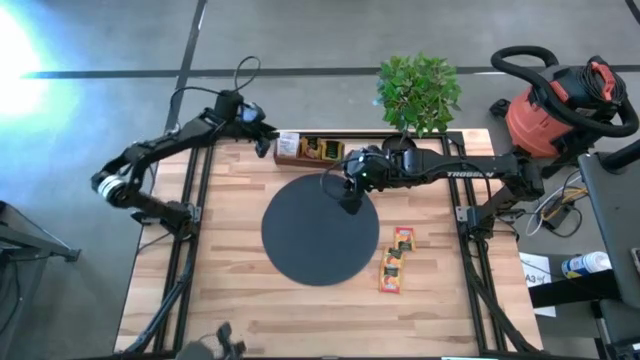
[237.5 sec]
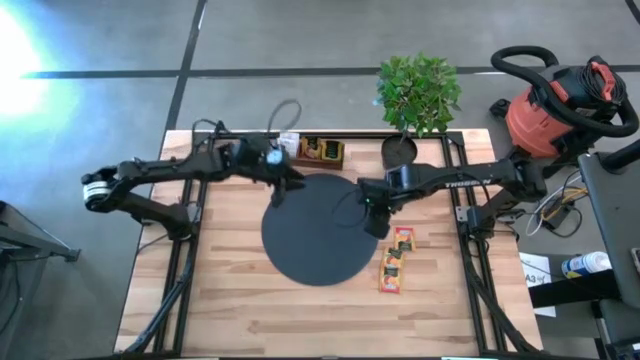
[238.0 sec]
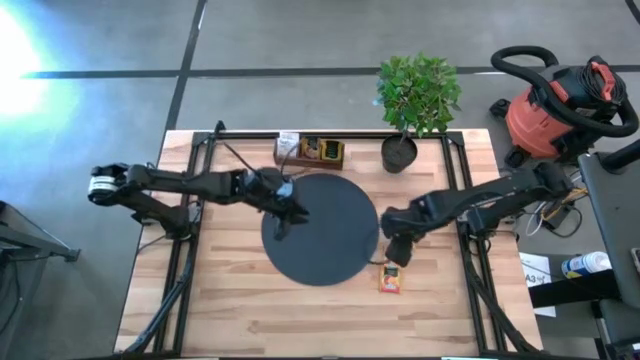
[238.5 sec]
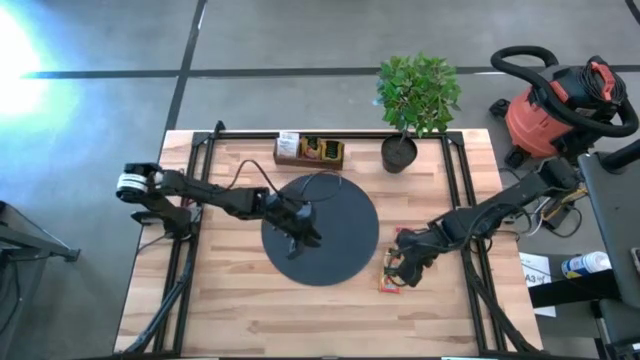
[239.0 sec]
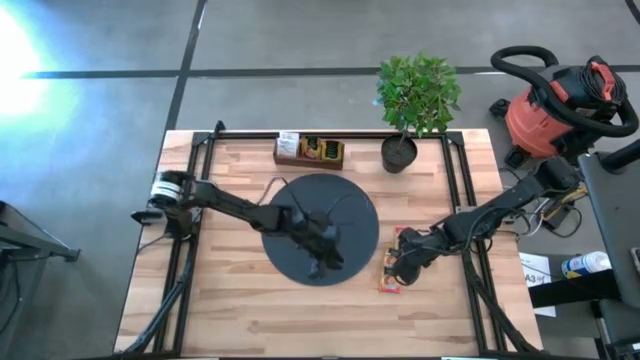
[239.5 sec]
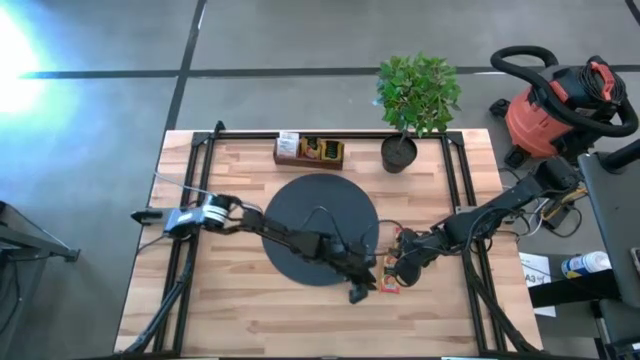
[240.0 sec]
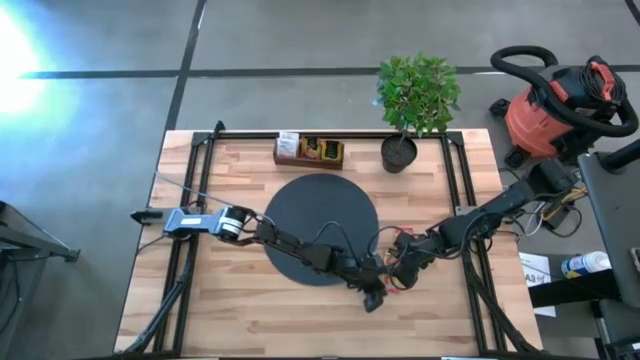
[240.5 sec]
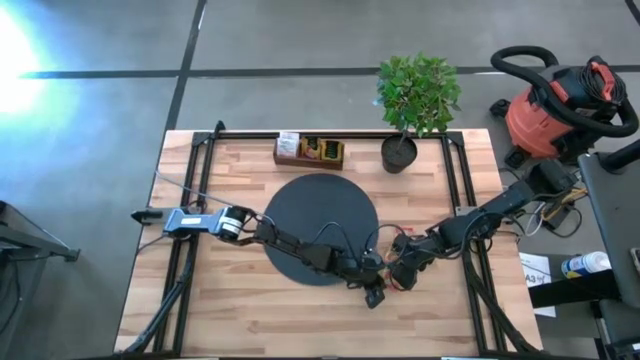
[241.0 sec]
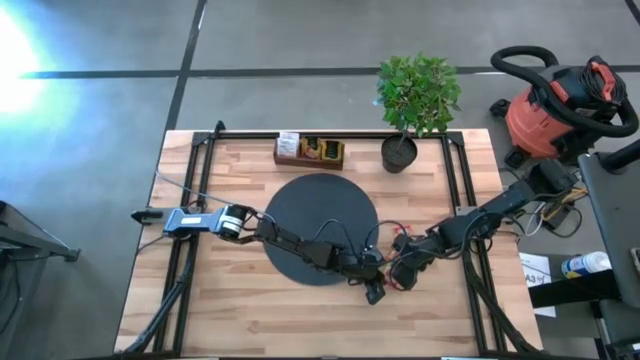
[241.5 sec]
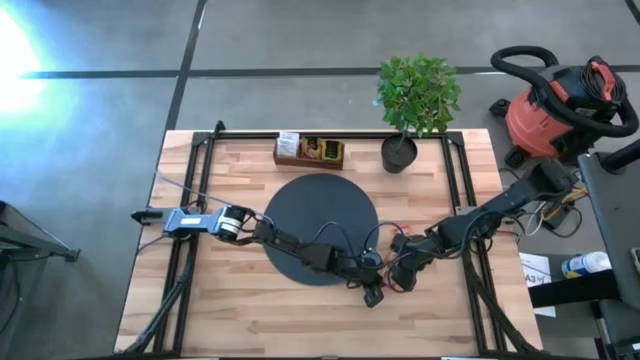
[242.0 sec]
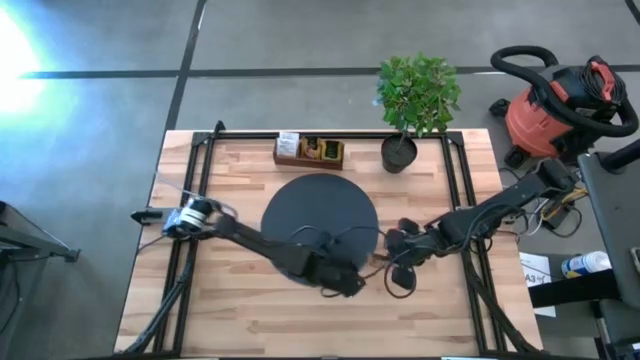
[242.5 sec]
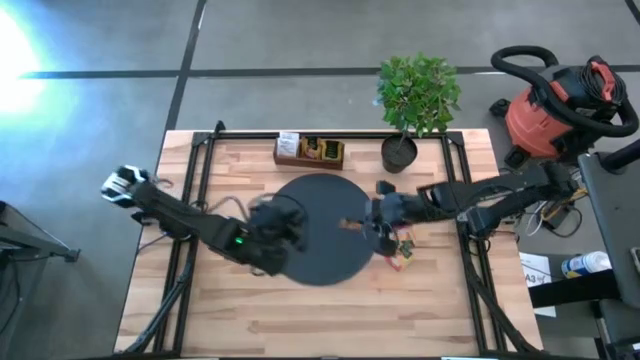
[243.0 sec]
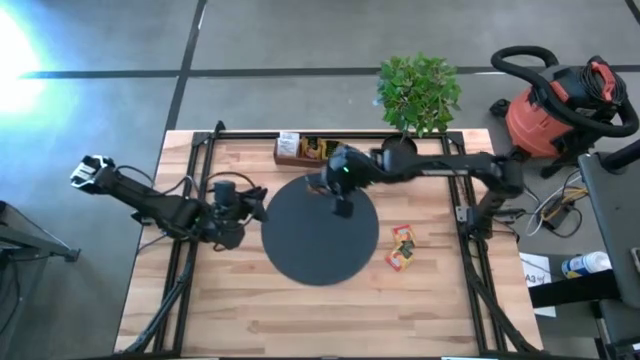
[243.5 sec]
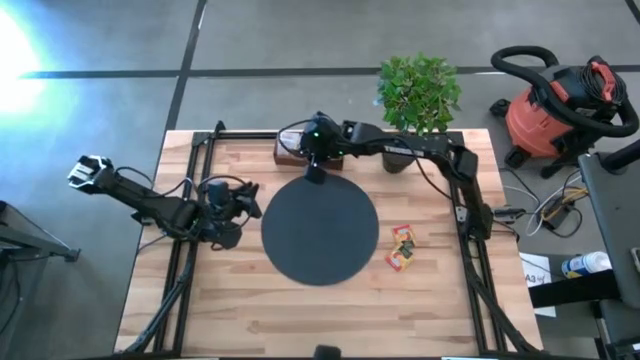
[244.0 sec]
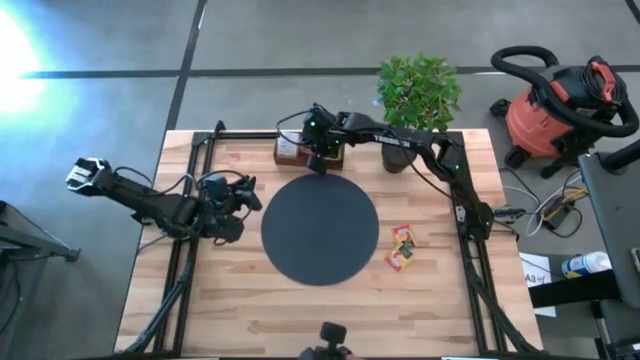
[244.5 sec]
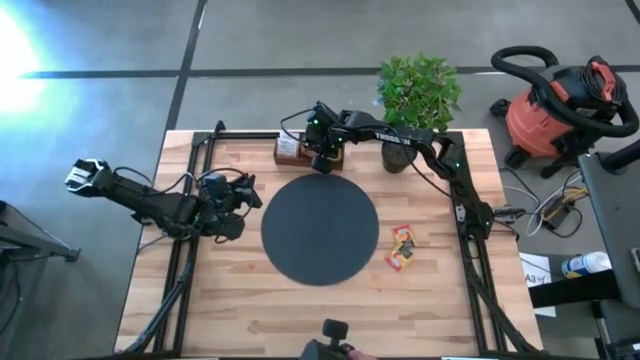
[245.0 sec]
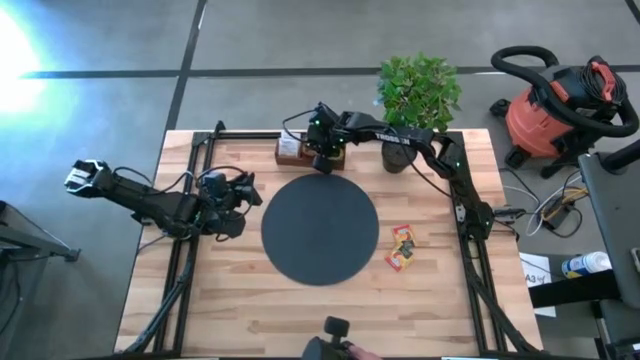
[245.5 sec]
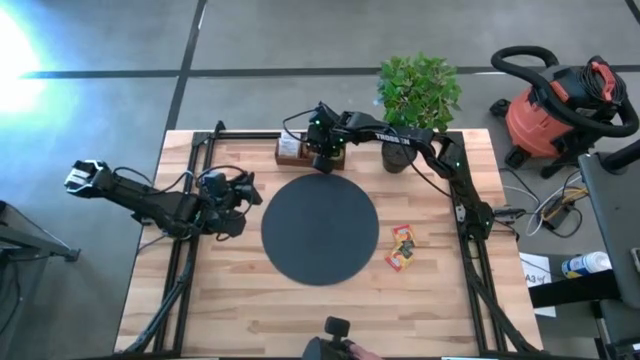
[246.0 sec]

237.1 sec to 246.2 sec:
Task: Pick & Place Tea
Put the orange tea bag into the middle section of the brown wooden organizer

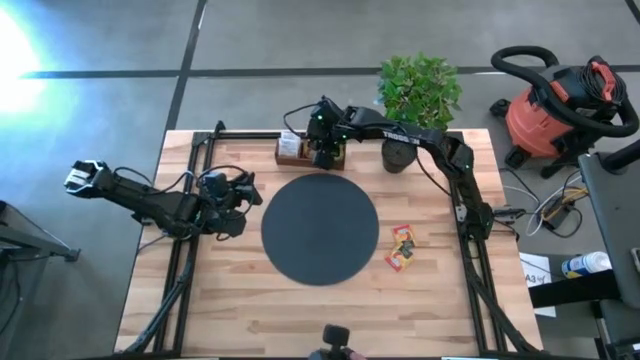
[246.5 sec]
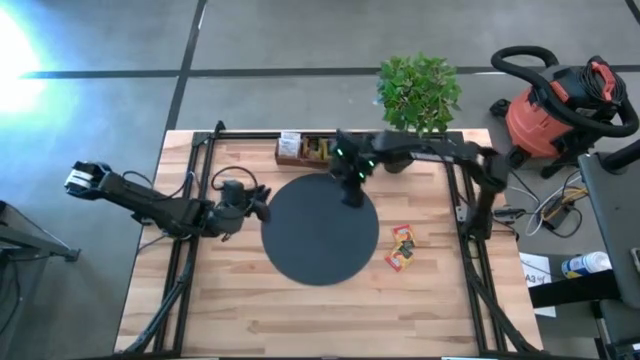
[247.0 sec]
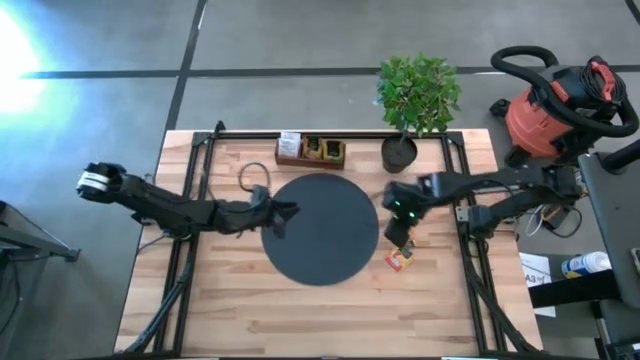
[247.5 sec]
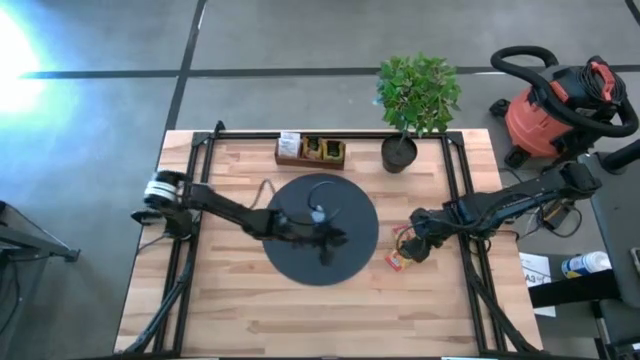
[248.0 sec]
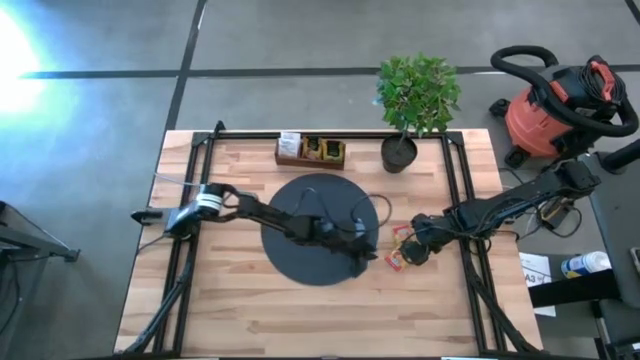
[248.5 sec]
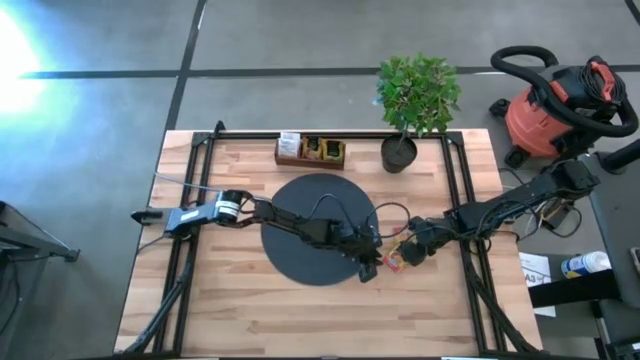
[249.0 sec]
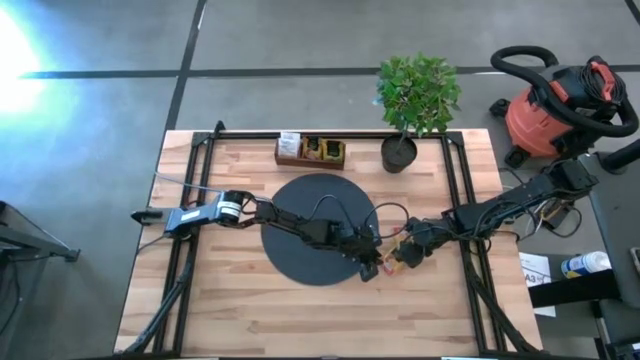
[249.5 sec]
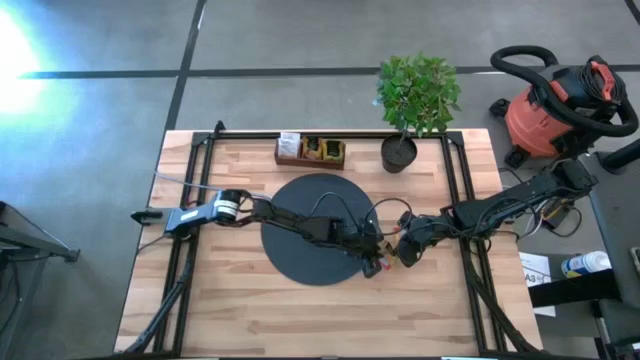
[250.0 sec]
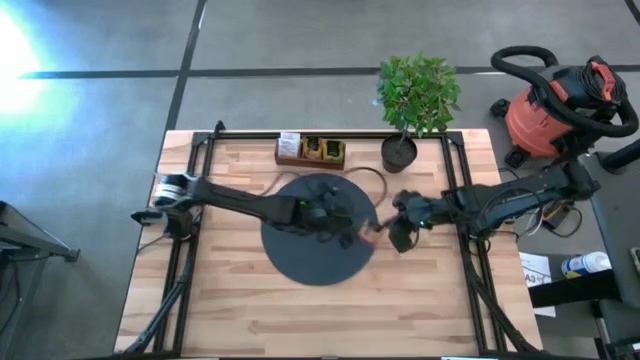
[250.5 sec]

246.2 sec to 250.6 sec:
Put the orange tea bag into the middle section of the brown wooden organizer

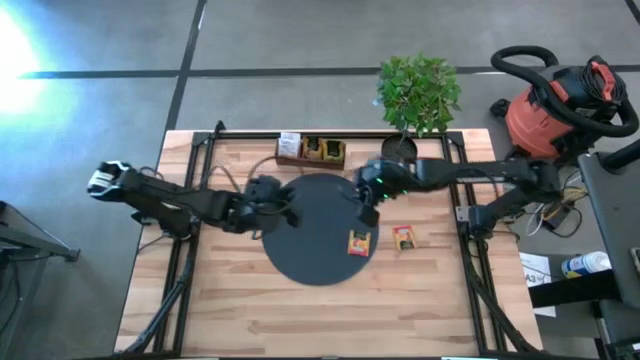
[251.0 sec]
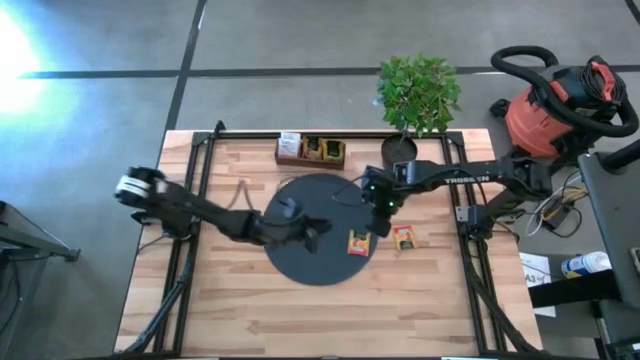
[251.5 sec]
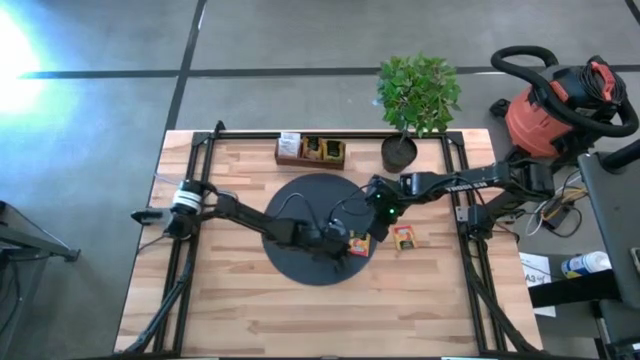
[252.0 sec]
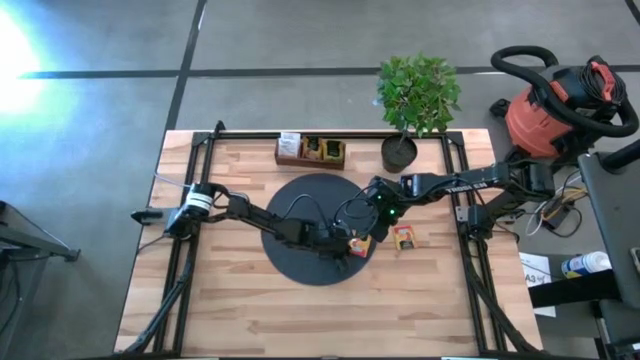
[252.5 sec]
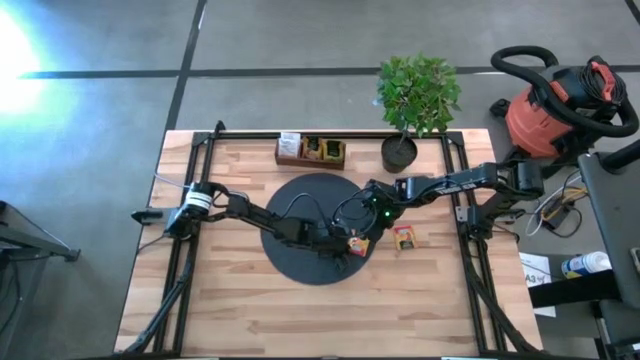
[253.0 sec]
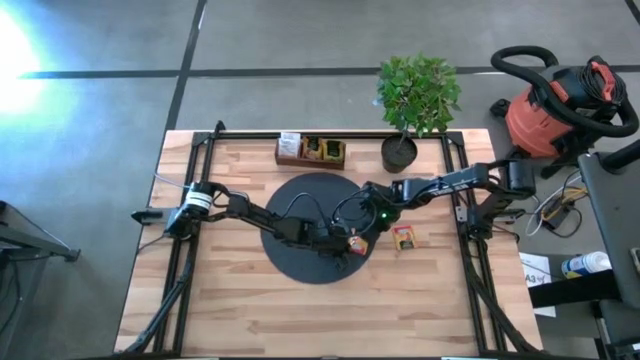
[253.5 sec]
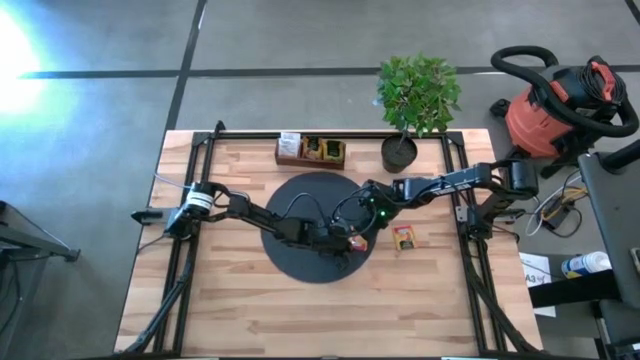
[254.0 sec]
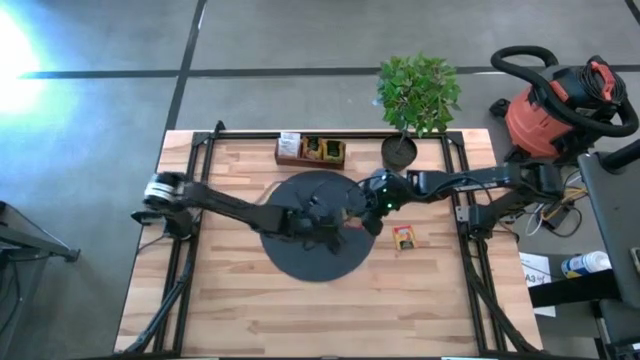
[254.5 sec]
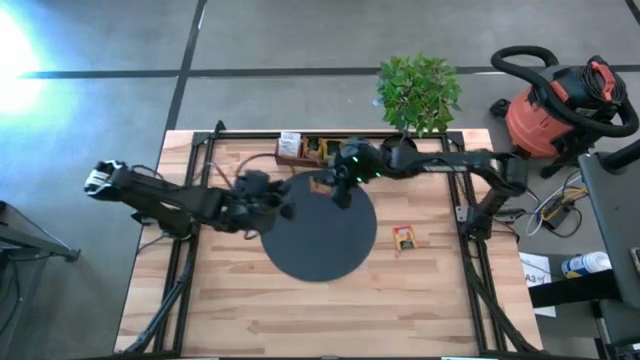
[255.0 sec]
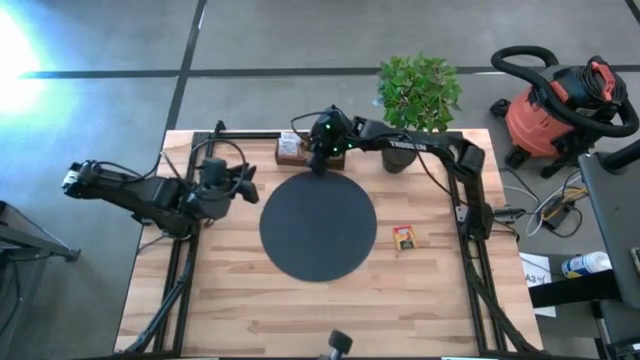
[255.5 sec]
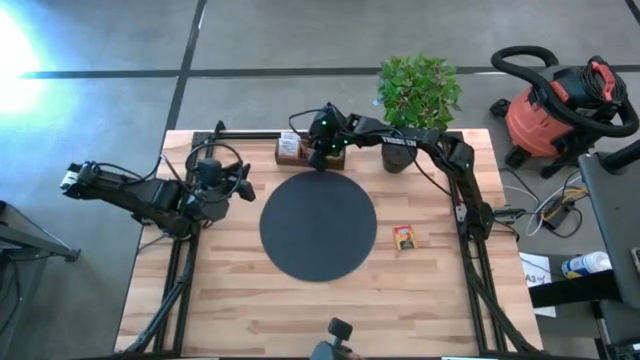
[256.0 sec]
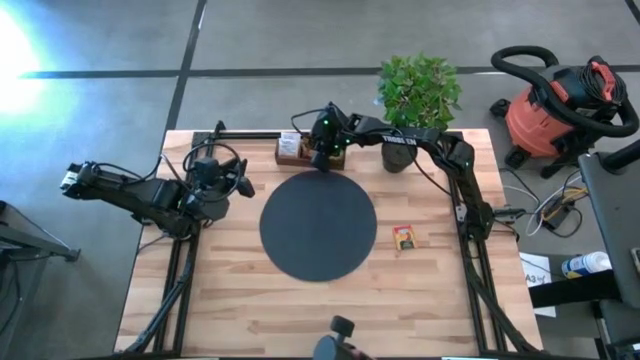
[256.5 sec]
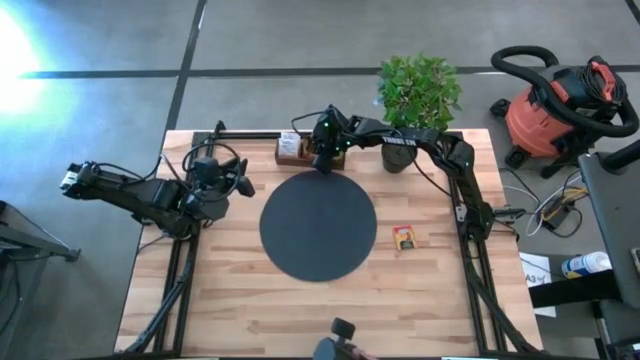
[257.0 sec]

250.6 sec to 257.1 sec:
Put the orange tea bag into the middle section of the brown wooden organizer

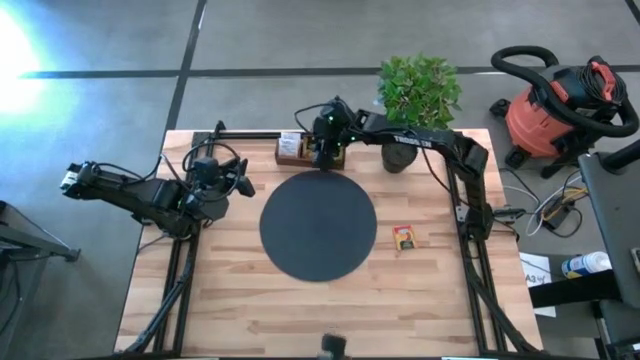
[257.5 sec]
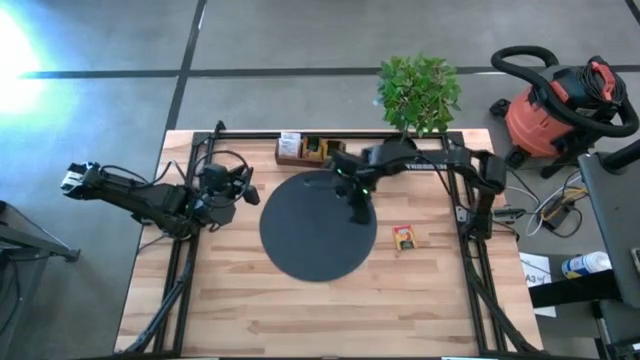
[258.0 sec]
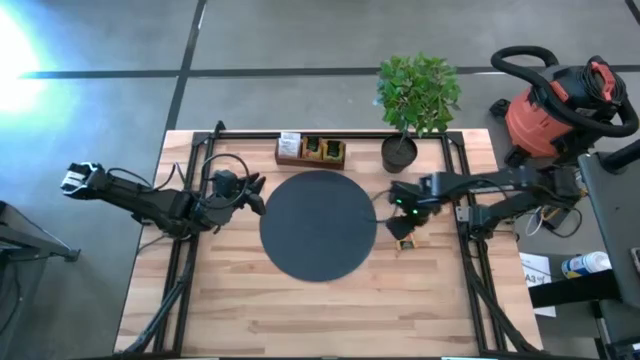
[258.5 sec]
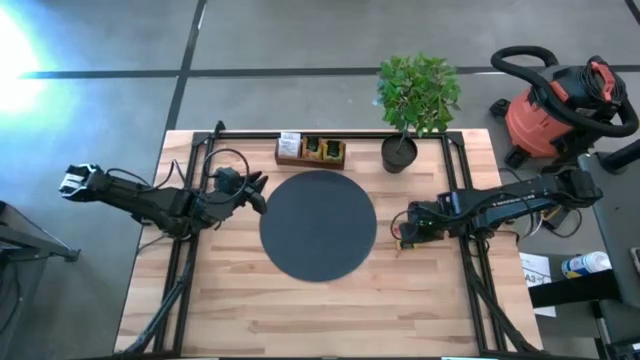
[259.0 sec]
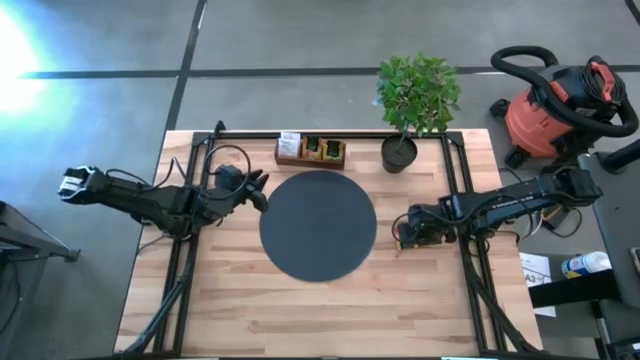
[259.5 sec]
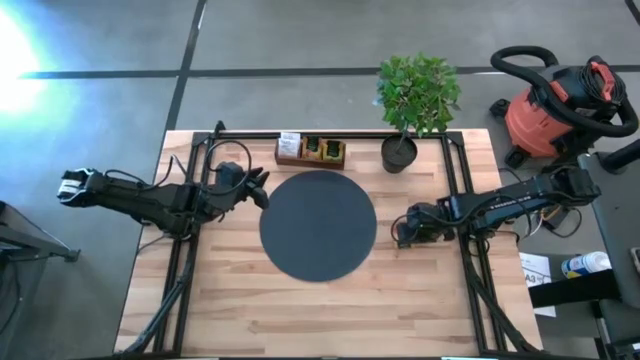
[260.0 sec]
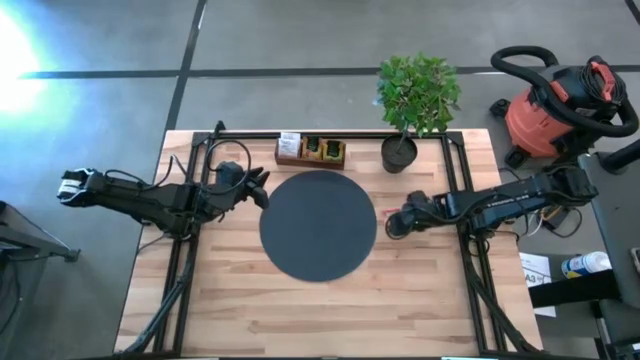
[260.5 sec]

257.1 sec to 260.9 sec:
Put the orange tea bag into the middle section of the brown wooden organizer
